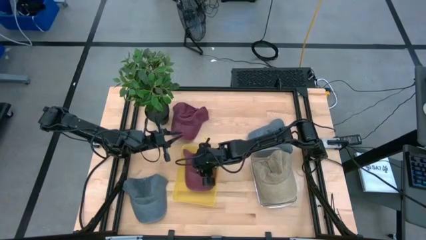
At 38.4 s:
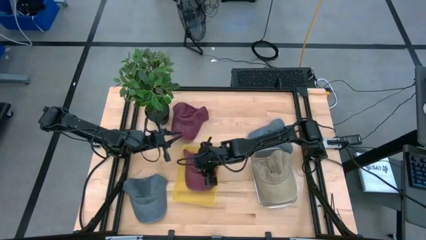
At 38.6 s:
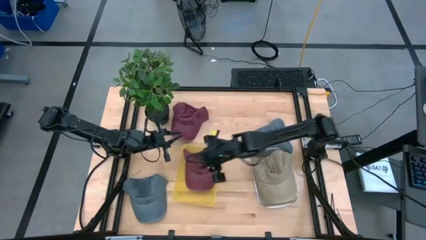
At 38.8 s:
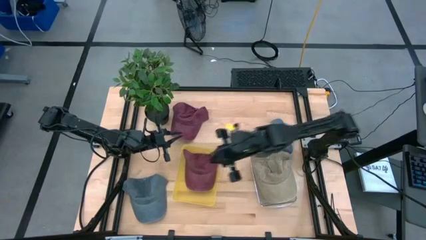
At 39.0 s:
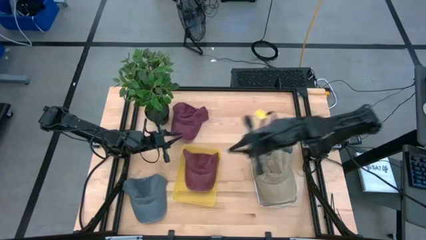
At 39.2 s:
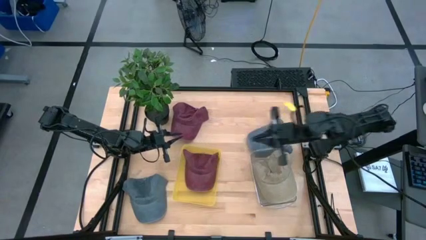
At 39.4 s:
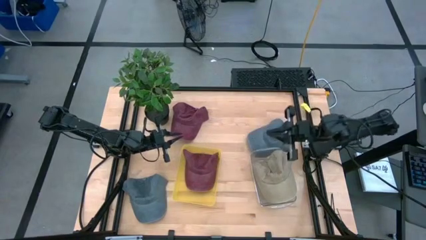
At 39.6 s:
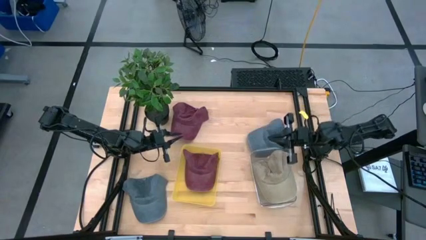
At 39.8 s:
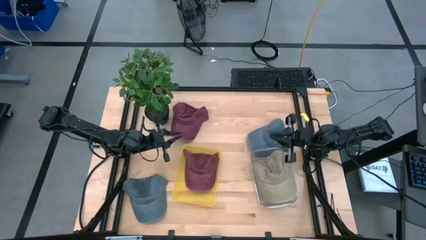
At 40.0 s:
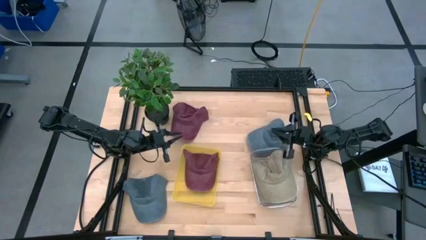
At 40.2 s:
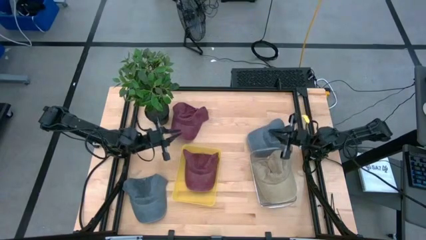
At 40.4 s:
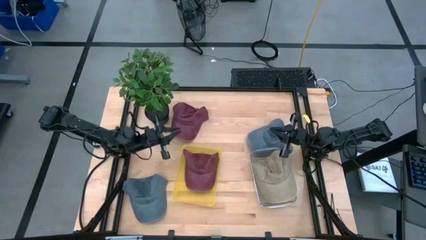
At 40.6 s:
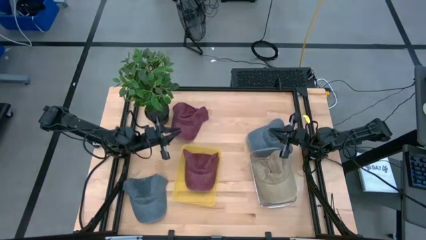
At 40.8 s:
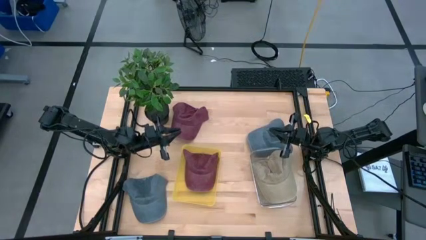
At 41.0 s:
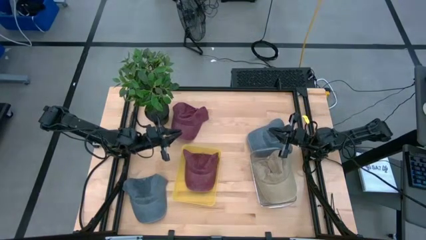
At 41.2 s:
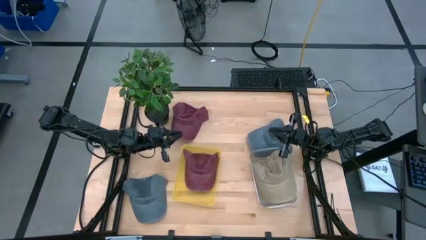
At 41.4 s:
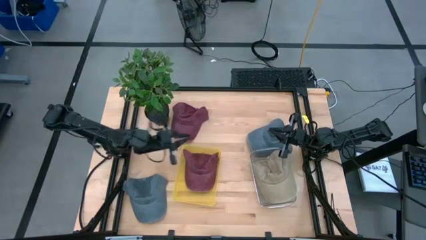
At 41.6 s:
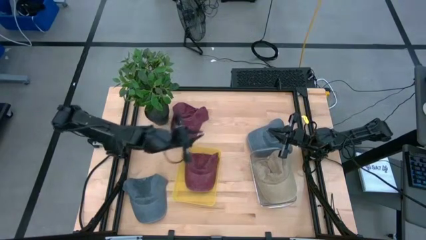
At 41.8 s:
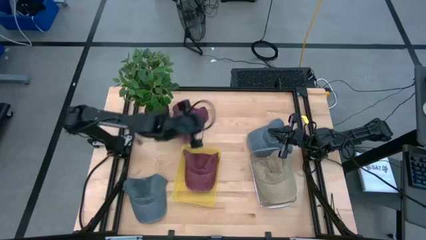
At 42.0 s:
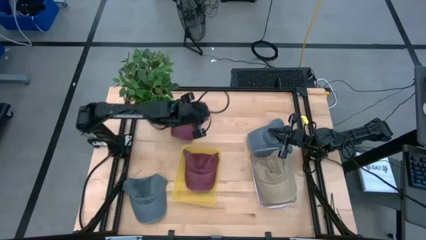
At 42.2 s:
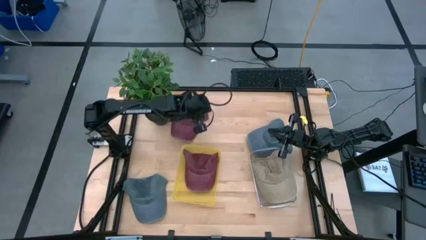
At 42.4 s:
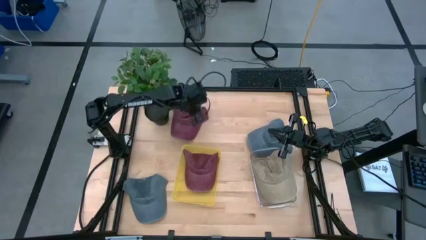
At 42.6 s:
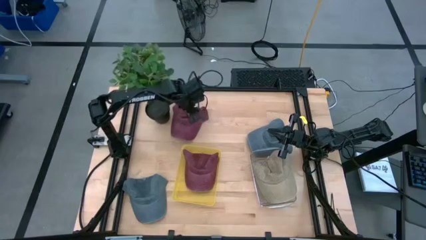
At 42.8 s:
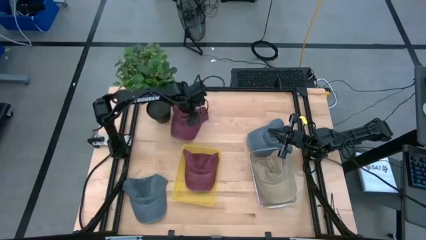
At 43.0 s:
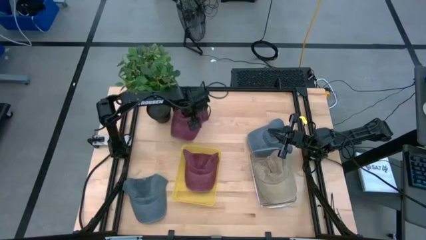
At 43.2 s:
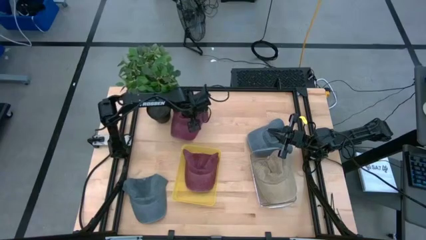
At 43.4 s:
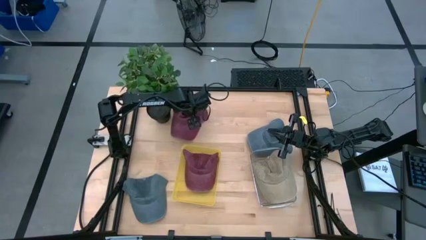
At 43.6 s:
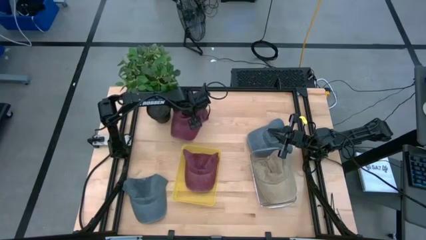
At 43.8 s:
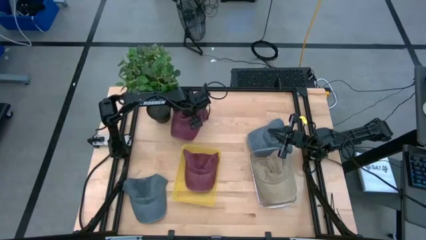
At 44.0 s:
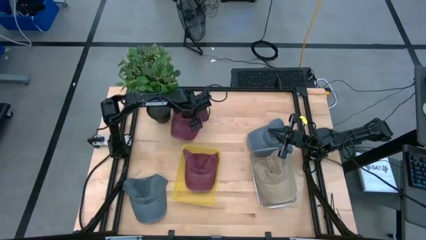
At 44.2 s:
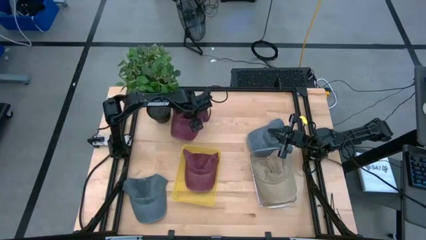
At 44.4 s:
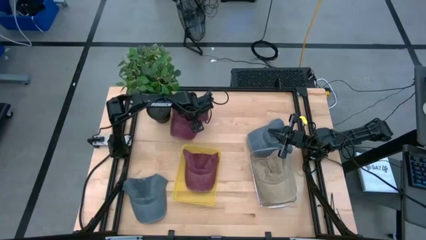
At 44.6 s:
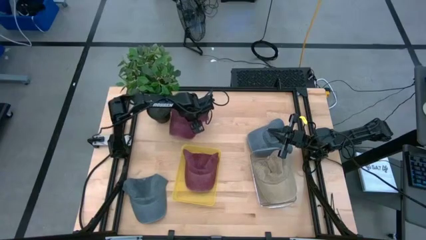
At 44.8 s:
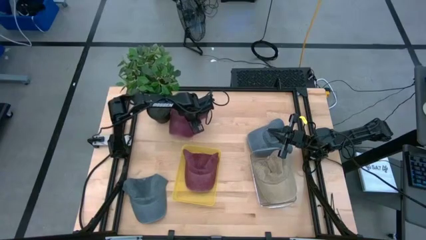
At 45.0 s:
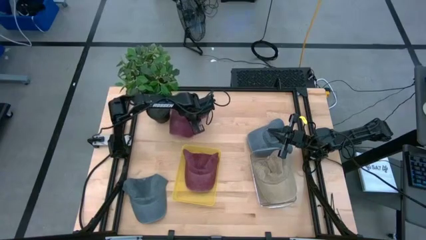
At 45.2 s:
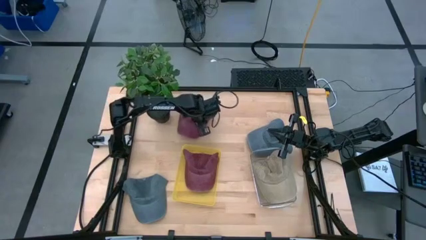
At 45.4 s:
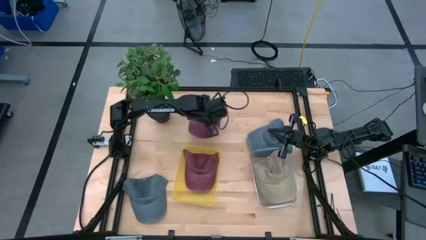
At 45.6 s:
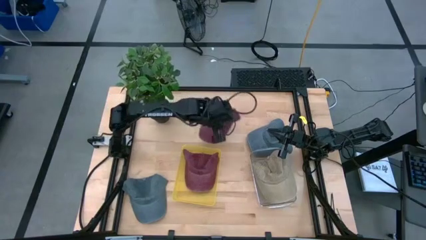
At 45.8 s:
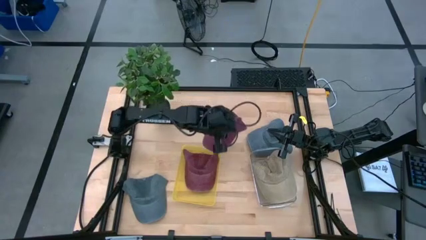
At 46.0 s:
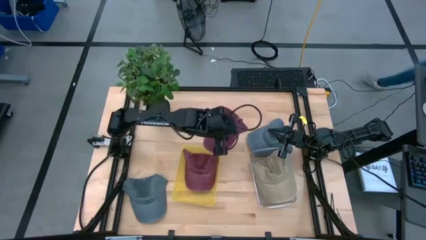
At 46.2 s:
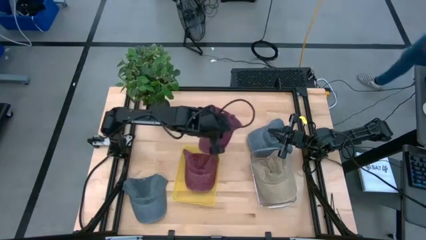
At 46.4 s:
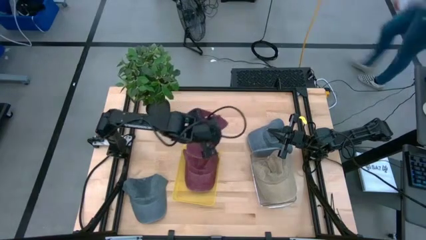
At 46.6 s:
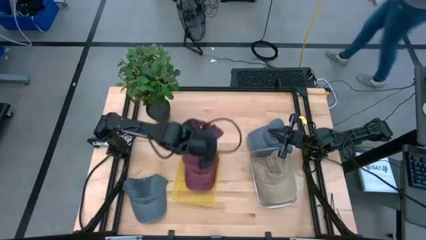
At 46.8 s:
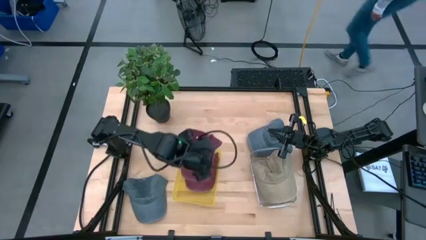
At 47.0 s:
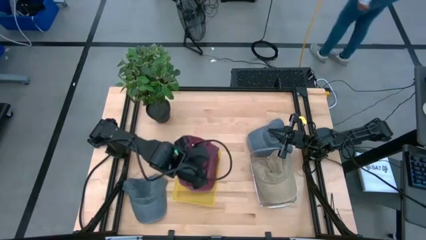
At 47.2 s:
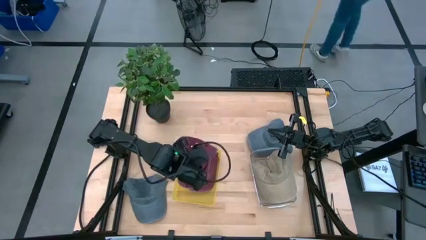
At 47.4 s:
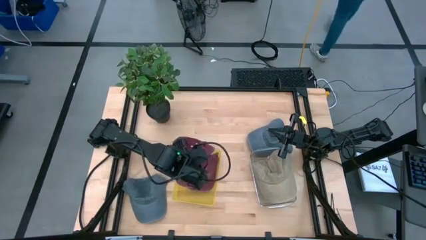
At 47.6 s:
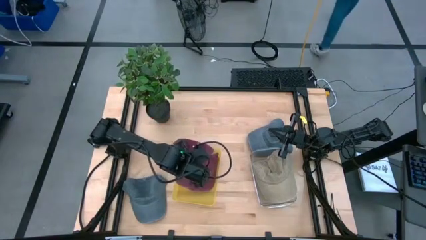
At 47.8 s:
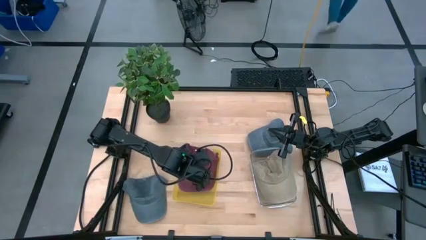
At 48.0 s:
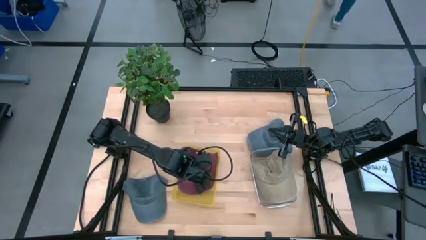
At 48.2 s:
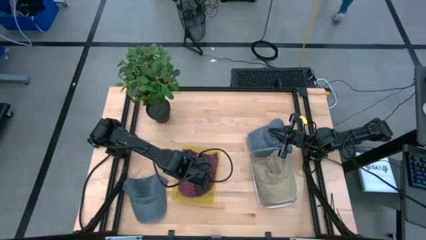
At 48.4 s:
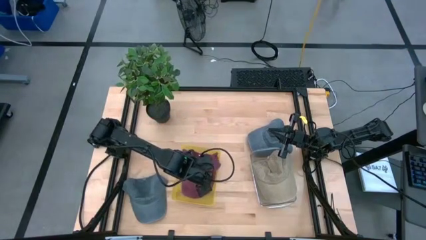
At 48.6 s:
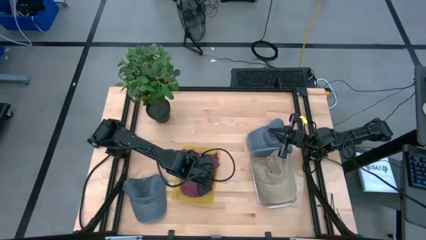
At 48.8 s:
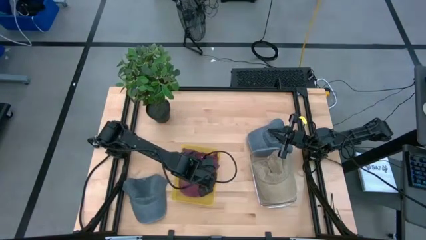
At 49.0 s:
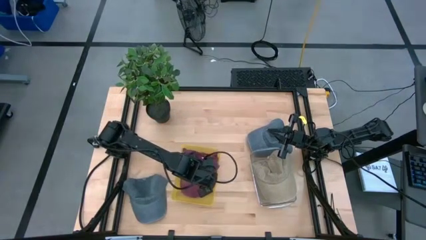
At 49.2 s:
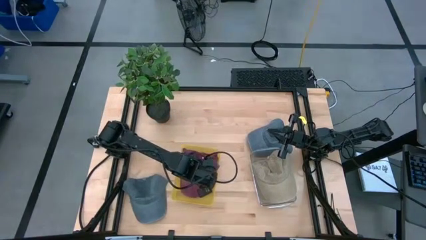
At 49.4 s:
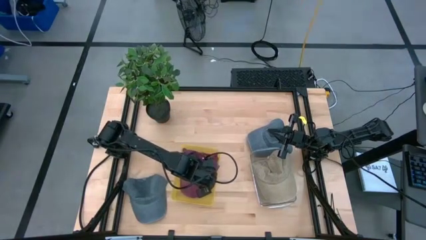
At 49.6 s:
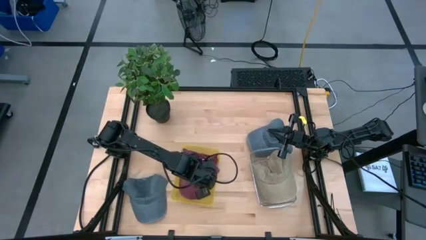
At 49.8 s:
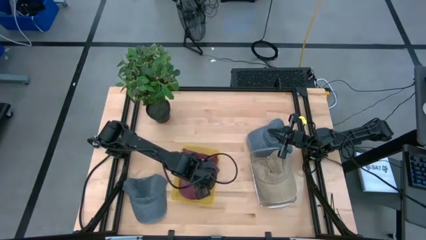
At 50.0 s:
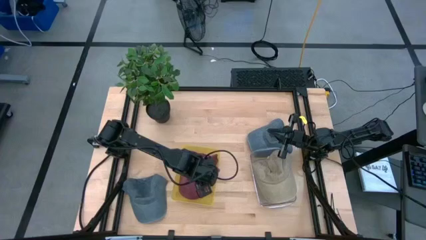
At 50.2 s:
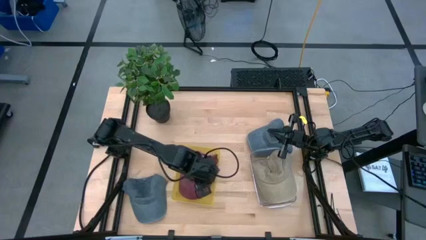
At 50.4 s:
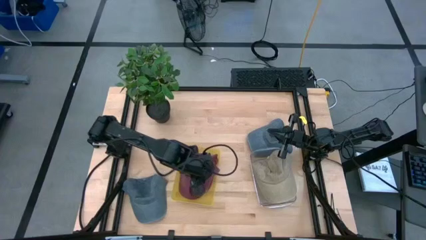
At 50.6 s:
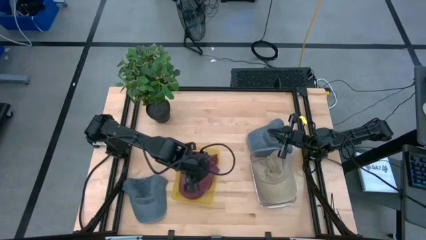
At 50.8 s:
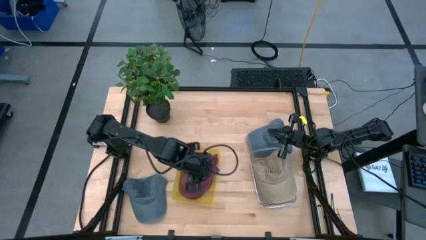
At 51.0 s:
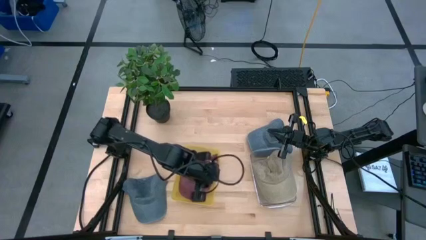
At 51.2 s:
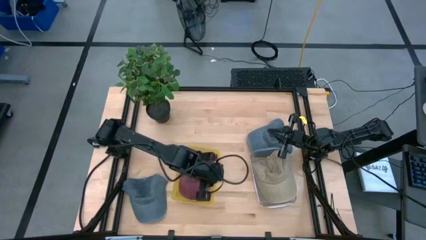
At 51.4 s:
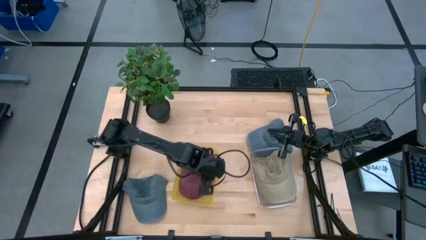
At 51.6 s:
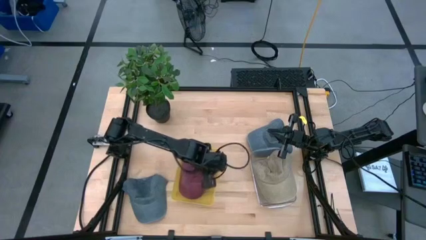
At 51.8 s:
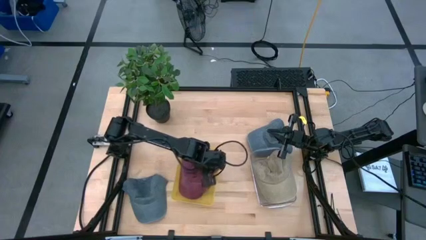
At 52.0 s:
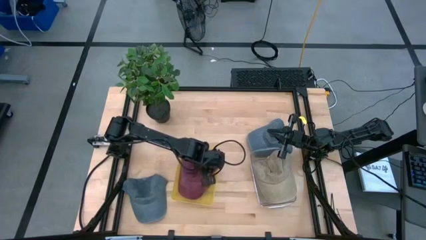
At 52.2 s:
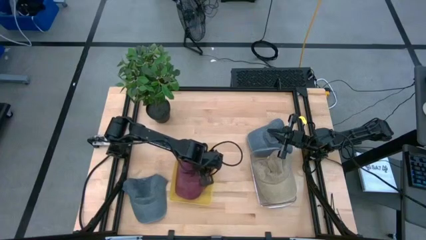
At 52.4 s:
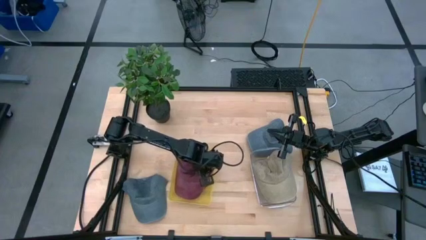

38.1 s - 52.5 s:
Task: Pick & Place hat
Put the red cap into the yellow bin
